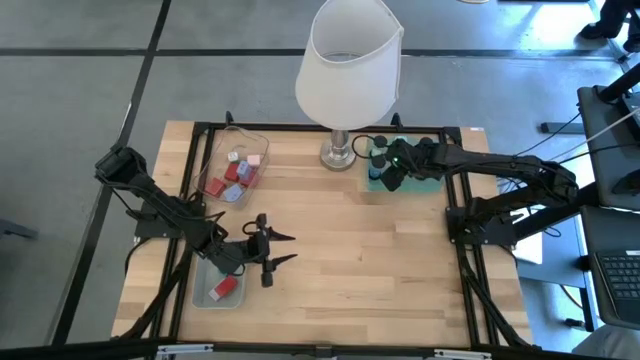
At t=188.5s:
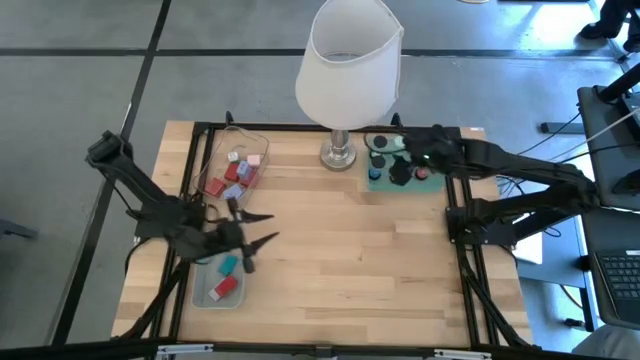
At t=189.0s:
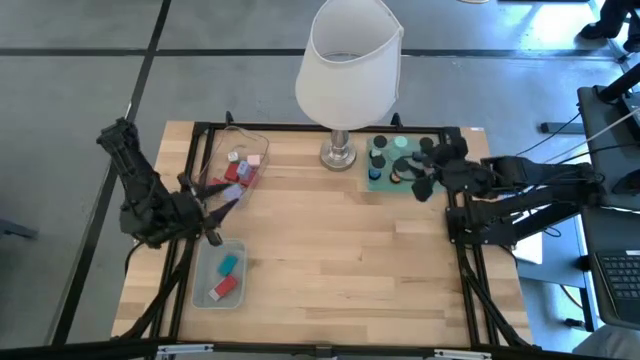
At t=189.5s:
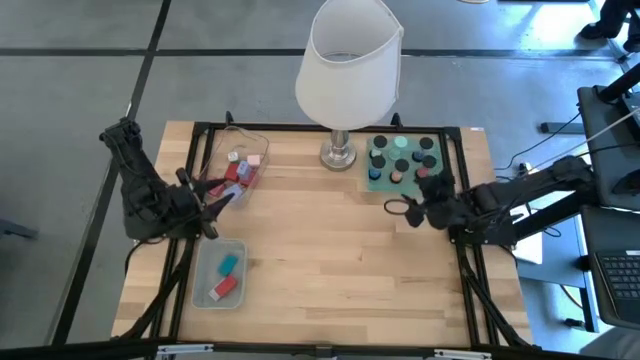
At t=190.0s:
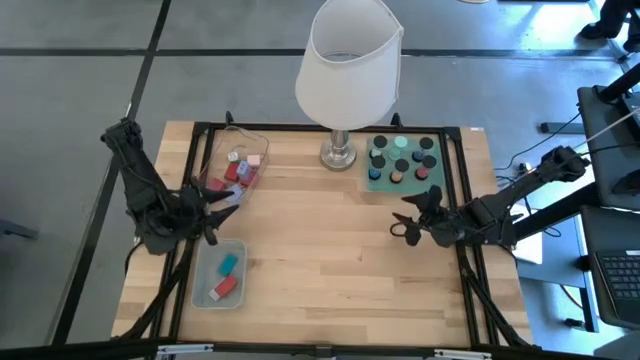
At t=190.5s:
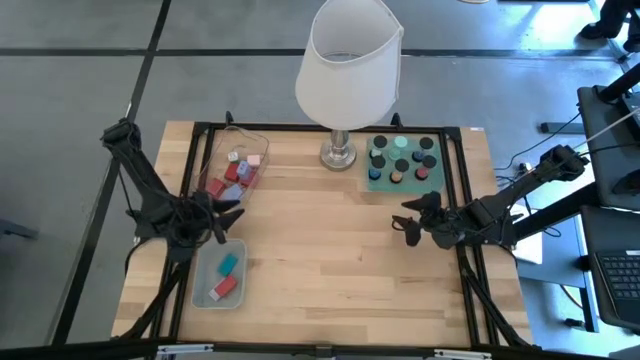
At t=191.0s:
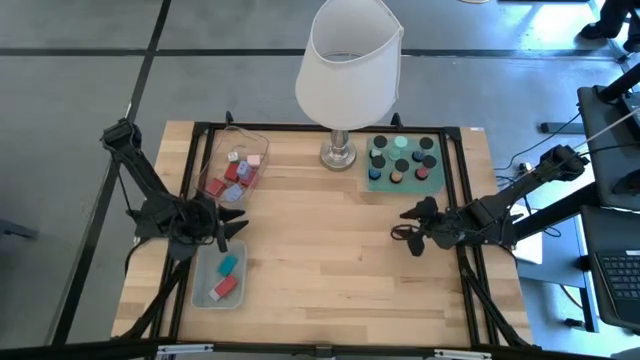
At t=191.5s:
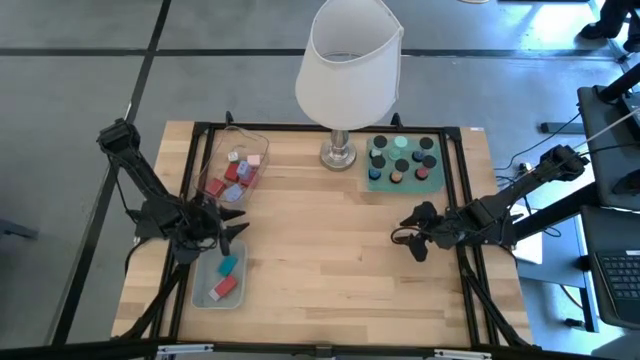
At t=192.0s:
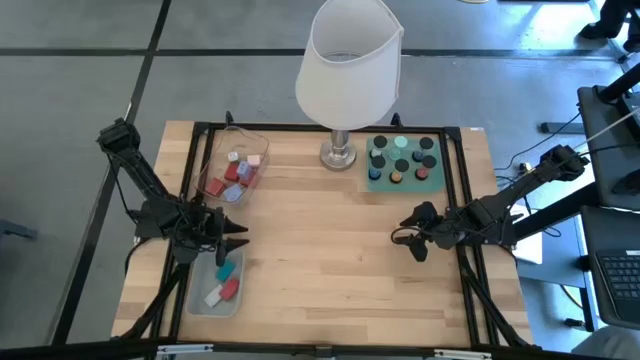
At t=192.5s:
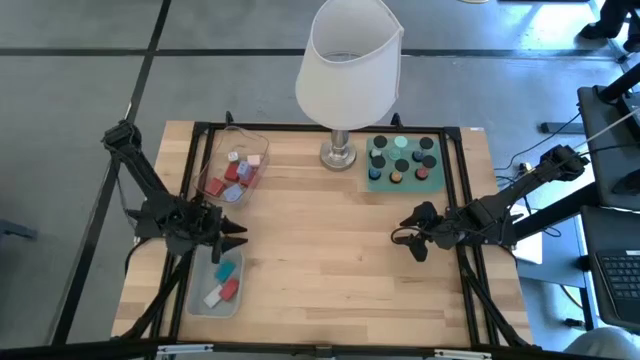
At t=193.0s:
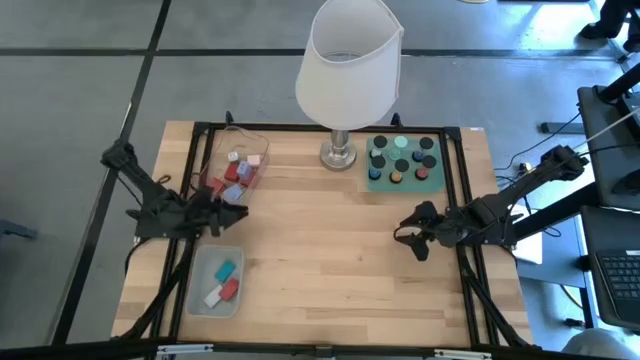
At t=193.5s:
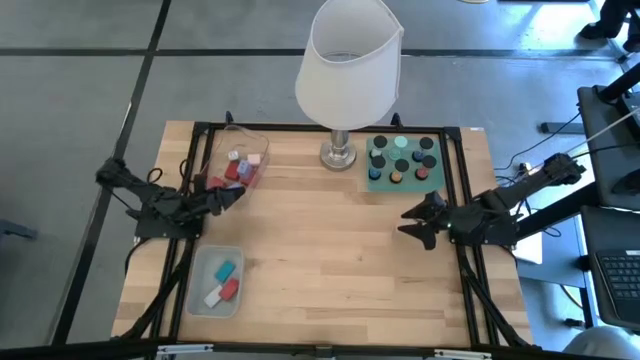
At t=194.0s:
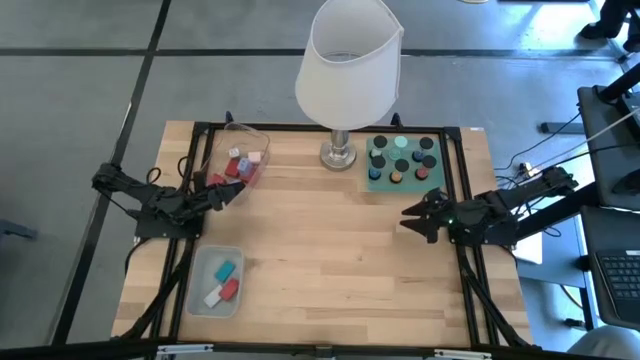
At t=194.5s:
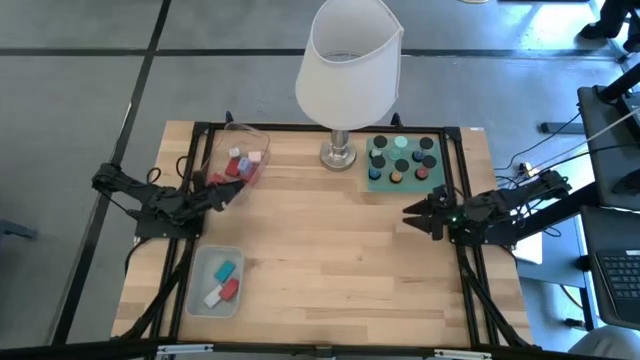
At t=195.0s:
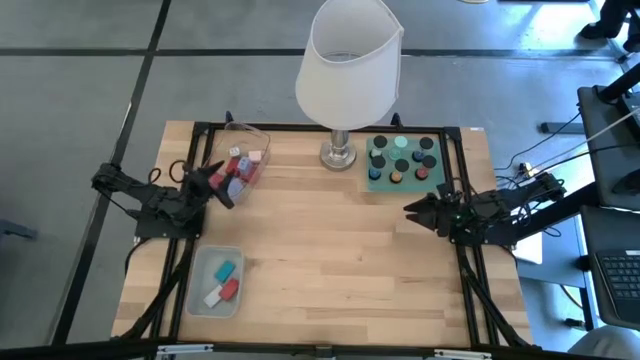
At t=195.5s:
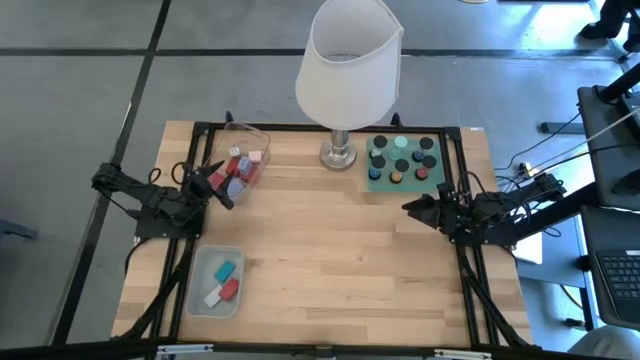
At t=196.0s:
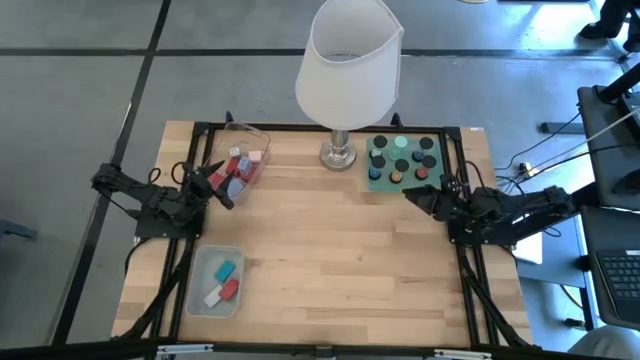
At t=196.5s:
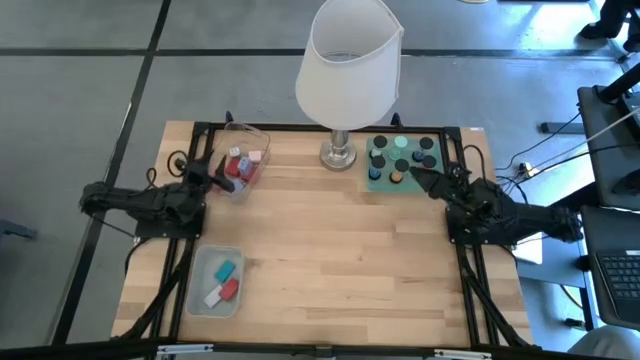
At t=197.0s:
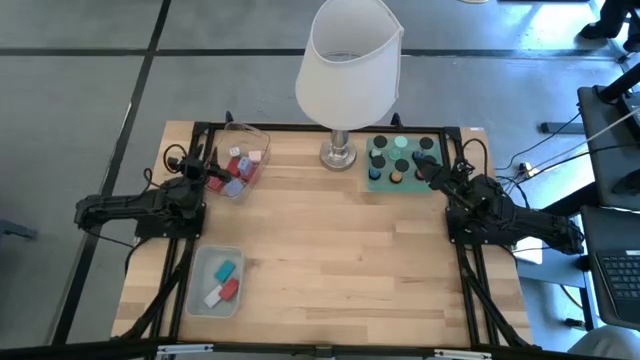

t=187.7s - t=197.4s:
Task: Pick & Place Office items
Return to Home Position

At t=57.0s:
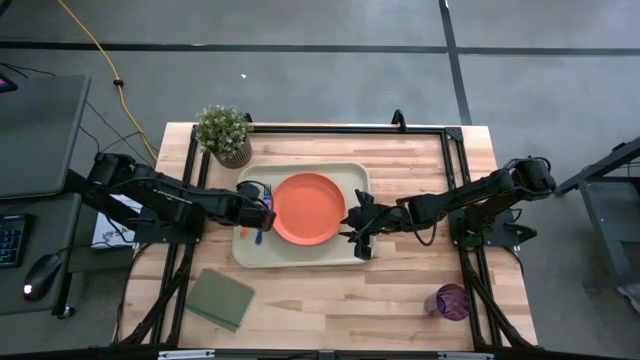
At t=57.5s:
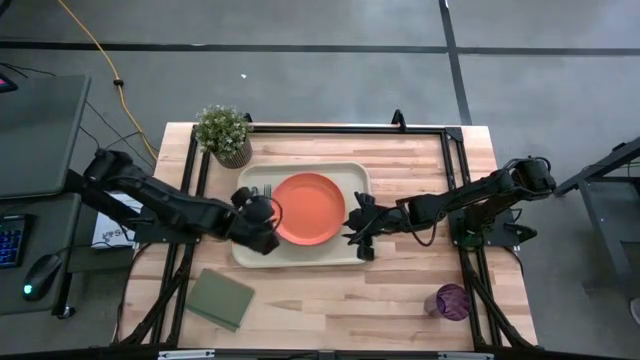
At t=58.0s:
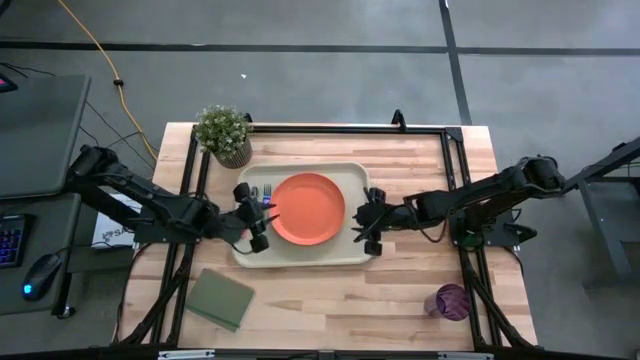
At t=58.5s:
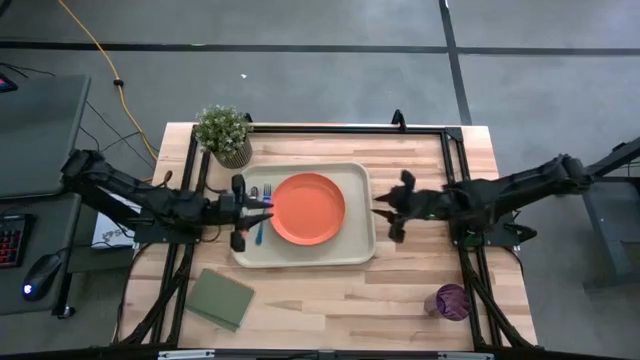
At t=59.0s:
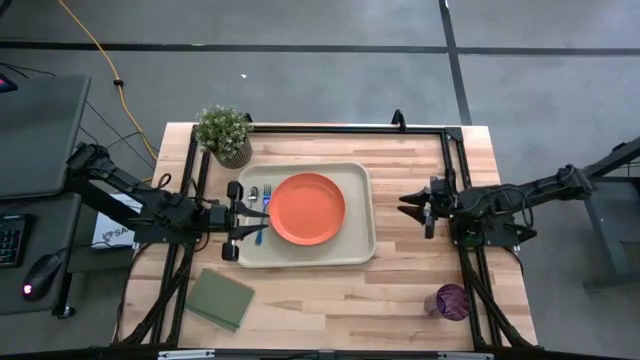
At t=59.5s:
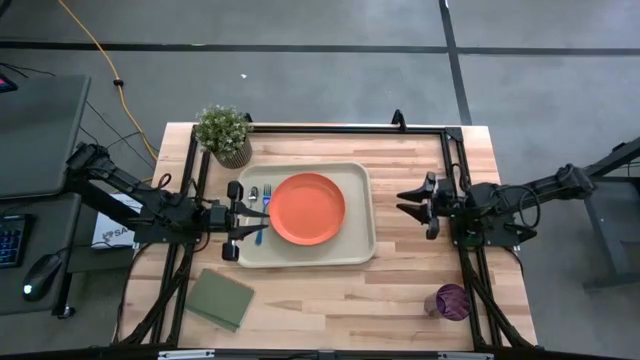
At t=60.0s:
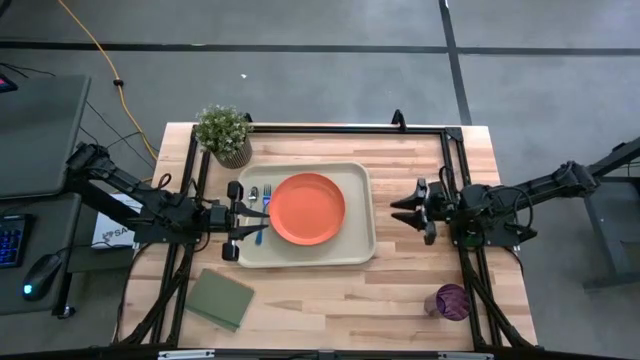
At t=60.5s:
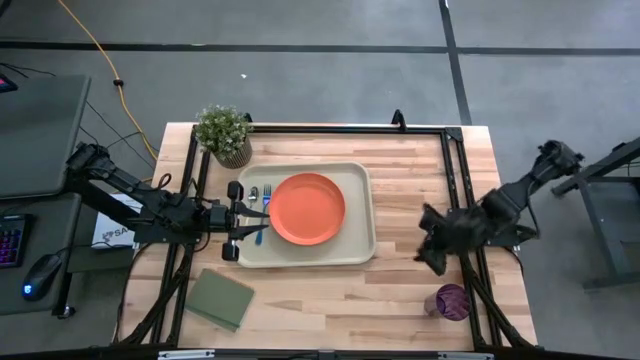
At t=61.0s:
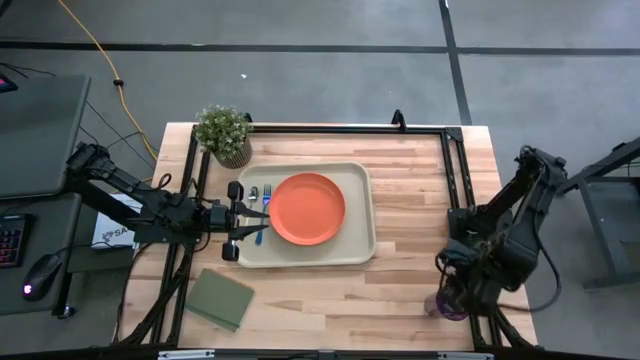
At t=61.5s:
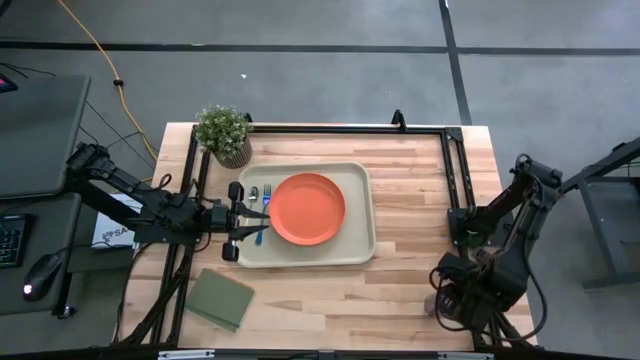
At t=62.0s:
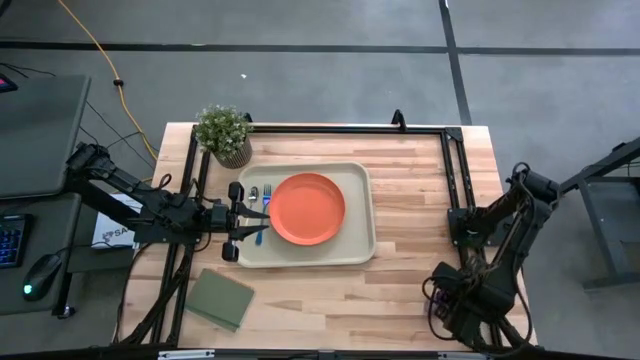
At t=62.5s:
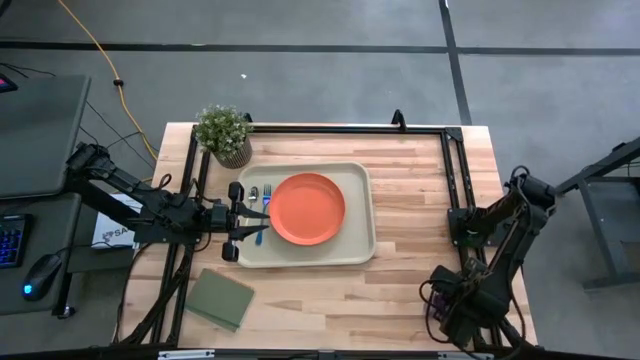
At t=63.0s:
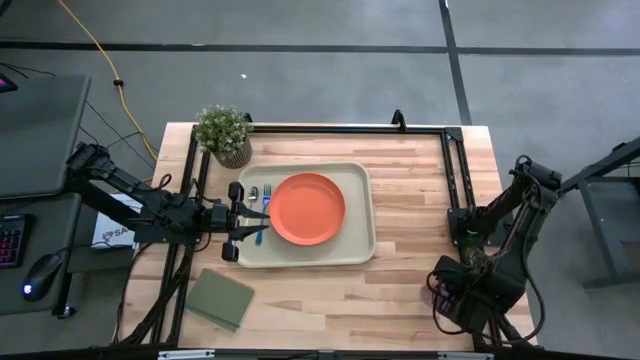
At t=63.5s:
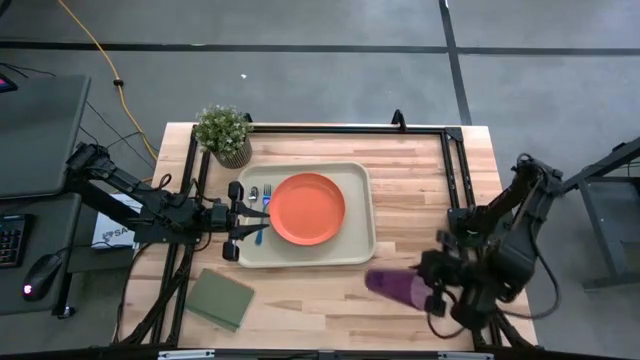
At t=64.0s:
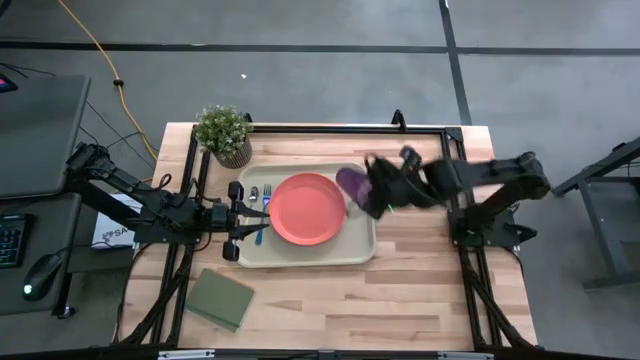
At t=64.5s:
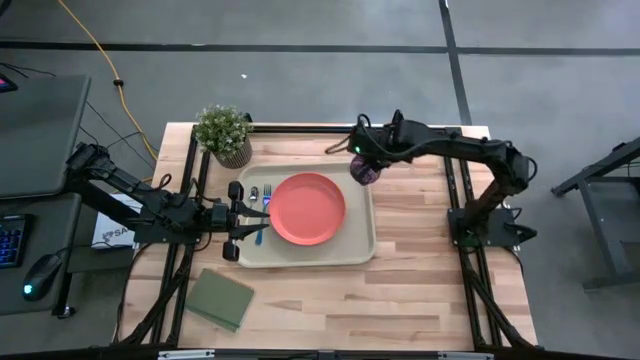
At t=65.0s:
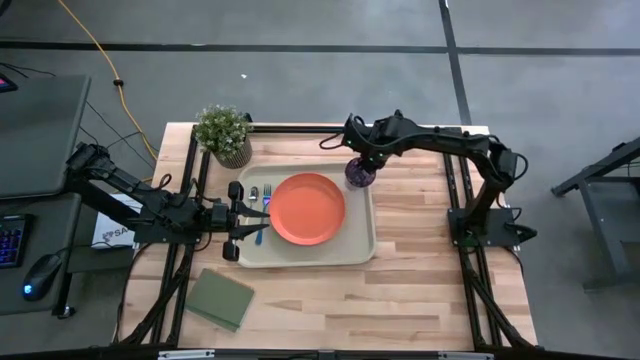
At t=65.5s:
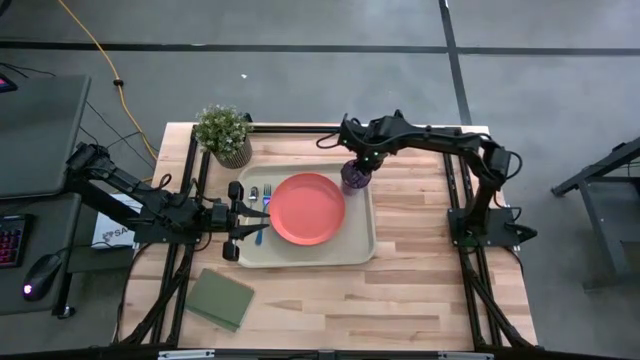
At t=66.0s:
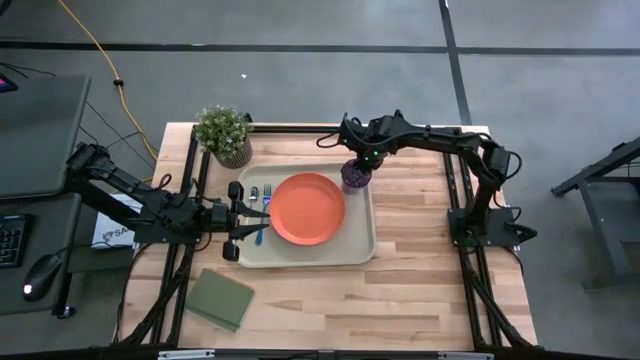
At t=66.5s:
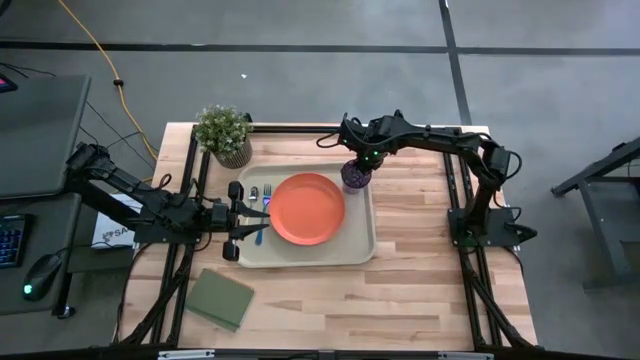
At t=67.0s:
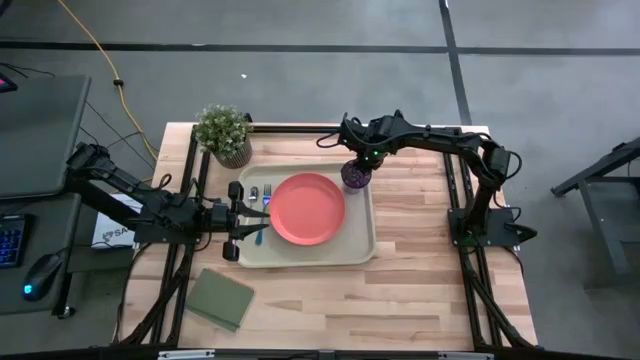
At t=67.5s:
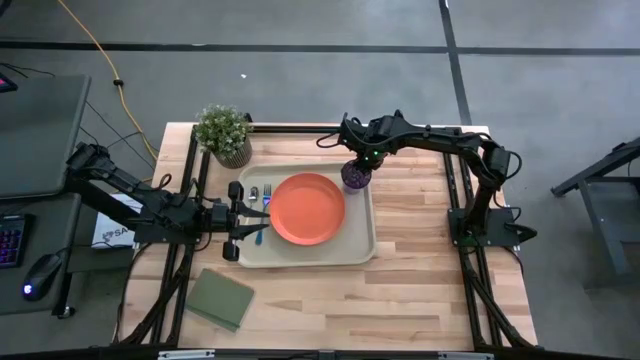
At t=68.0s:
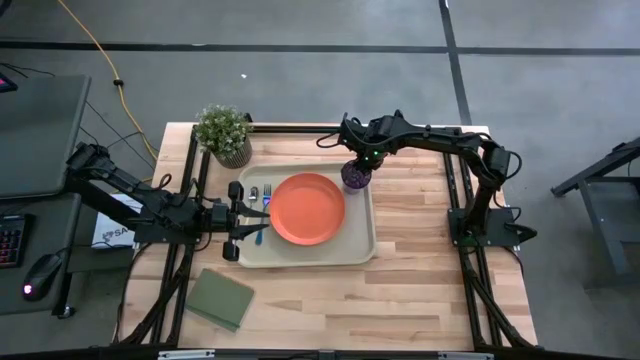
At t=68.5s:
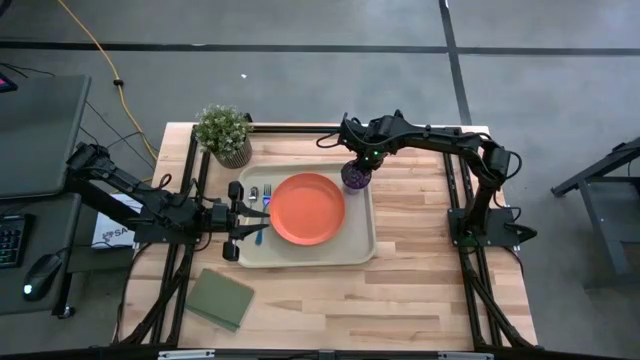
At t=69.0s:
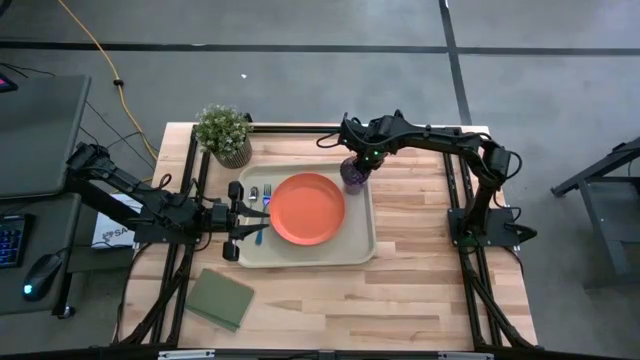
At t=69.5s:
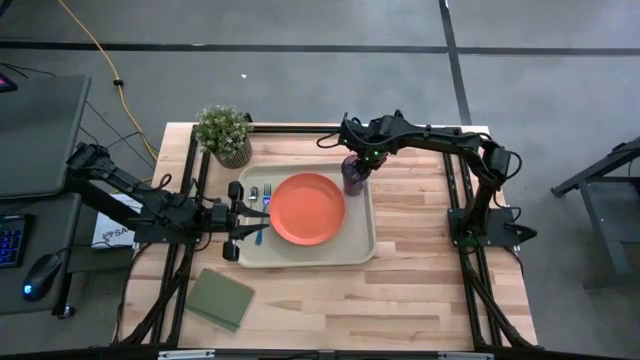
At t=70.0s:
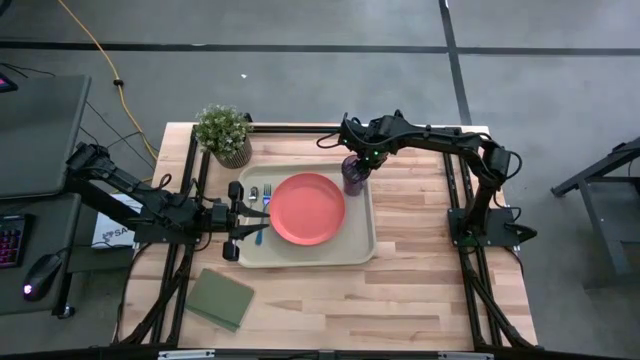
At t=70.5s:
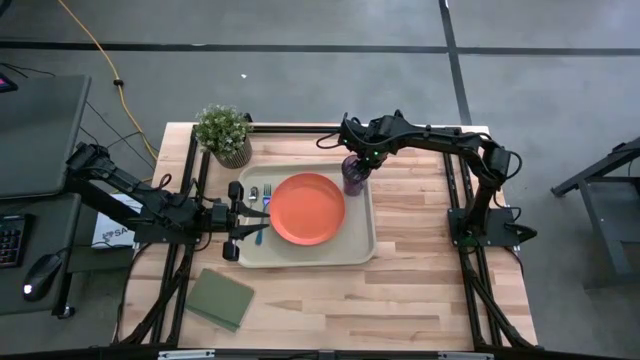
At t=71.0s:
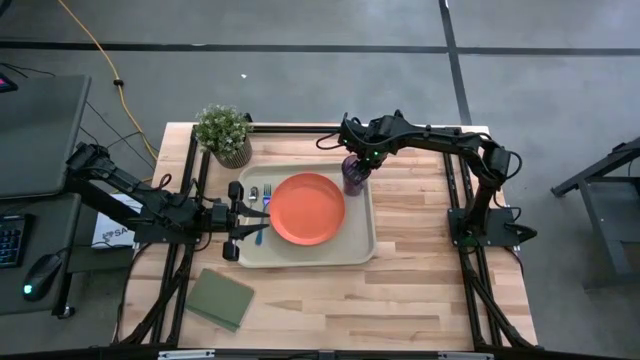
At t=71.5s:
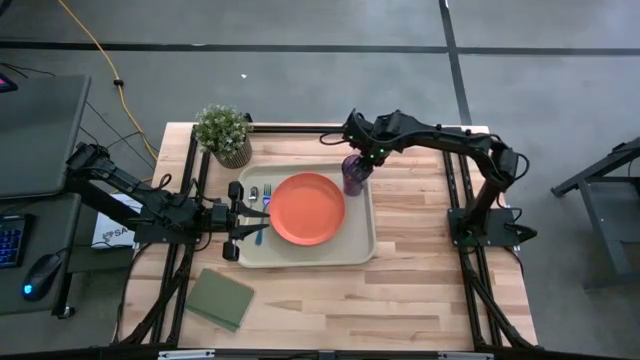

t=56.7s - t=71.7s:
Task: Pick and place plate/cup/fork/spoon on tray
Put the purple glass on the gray tray
